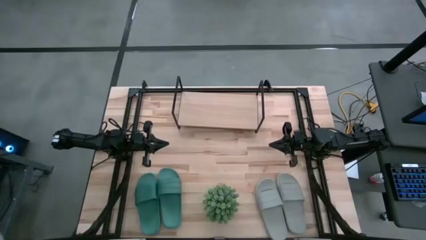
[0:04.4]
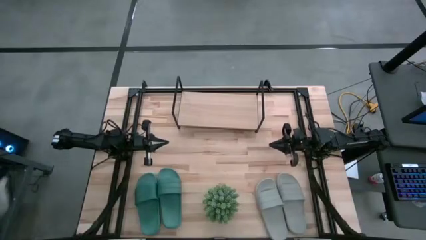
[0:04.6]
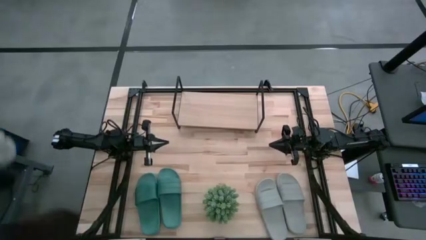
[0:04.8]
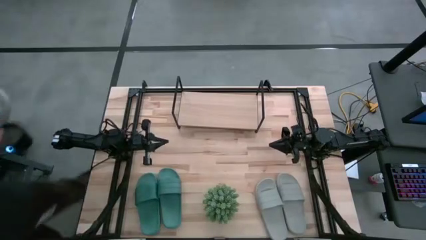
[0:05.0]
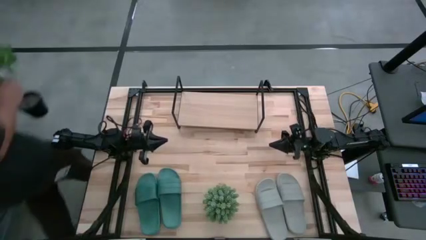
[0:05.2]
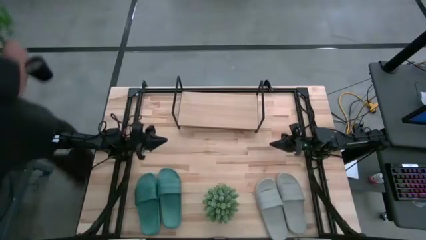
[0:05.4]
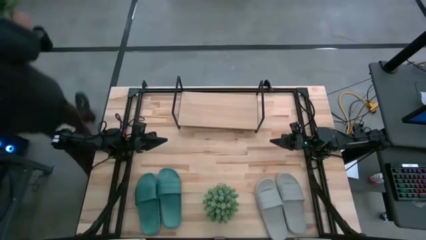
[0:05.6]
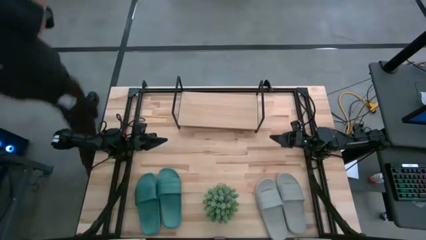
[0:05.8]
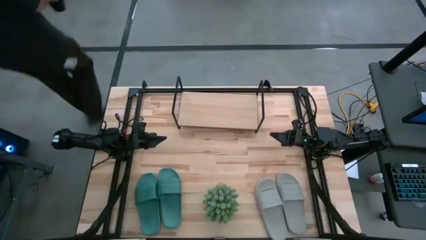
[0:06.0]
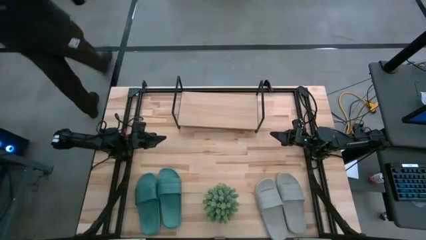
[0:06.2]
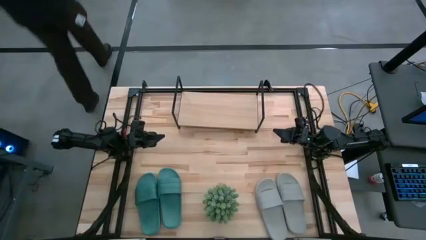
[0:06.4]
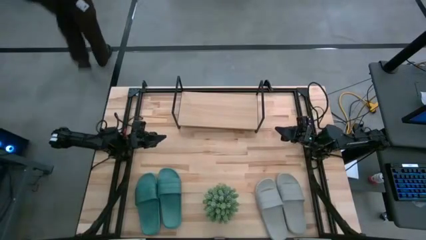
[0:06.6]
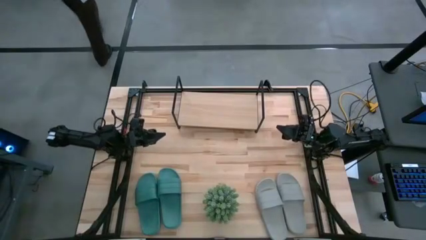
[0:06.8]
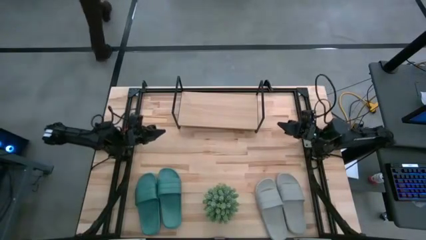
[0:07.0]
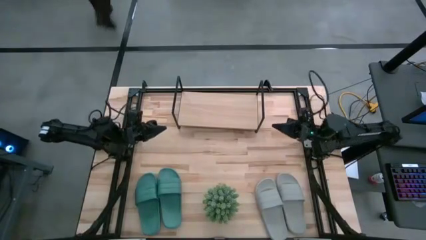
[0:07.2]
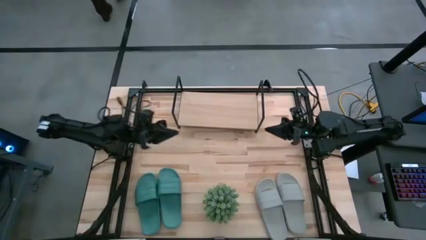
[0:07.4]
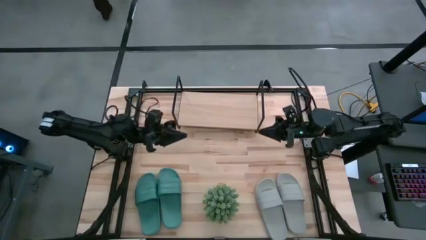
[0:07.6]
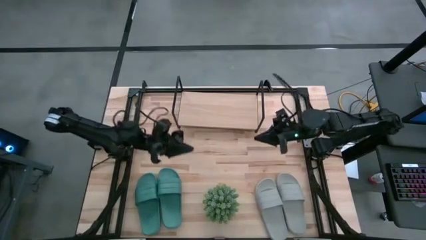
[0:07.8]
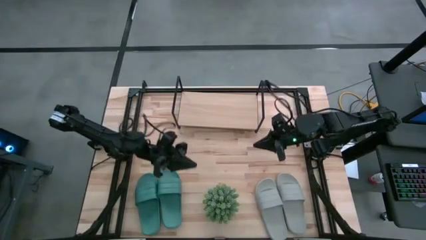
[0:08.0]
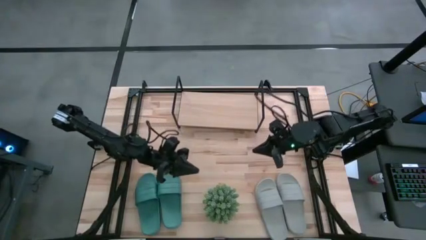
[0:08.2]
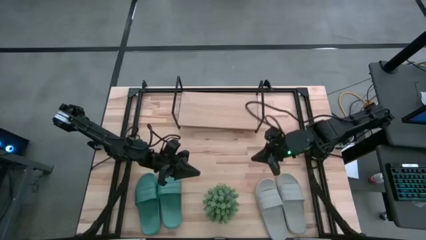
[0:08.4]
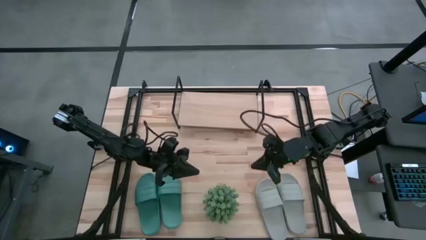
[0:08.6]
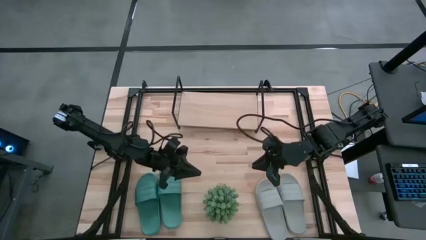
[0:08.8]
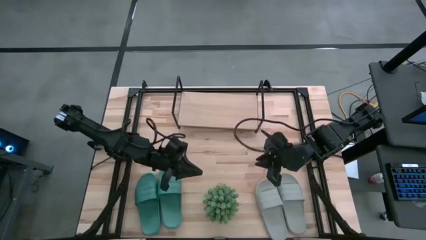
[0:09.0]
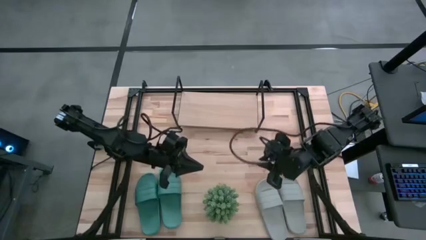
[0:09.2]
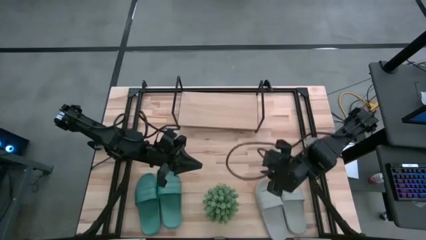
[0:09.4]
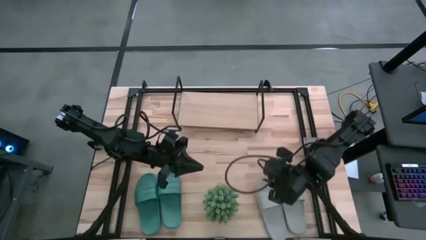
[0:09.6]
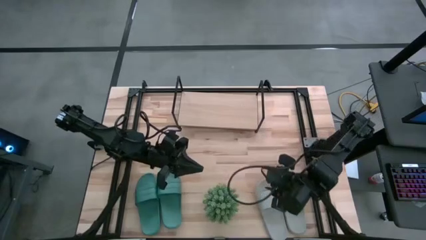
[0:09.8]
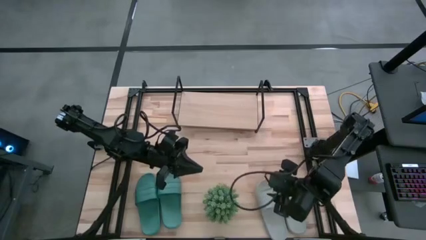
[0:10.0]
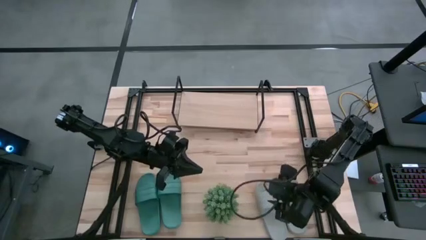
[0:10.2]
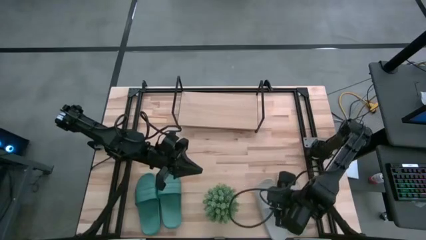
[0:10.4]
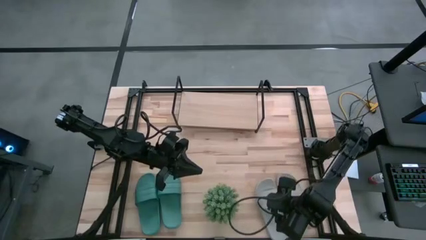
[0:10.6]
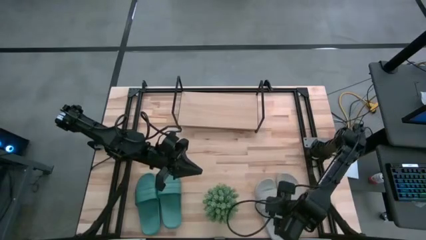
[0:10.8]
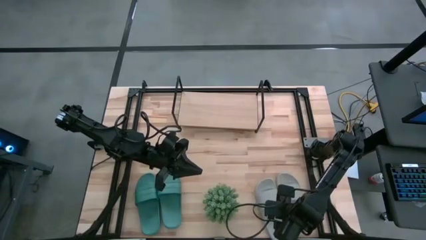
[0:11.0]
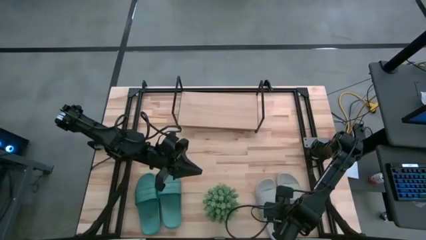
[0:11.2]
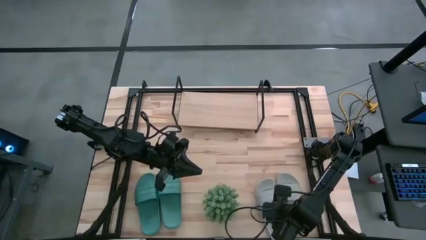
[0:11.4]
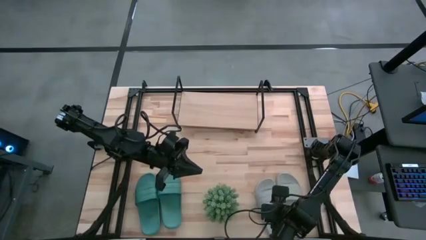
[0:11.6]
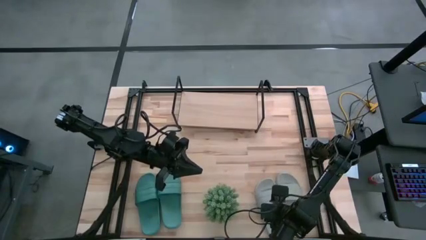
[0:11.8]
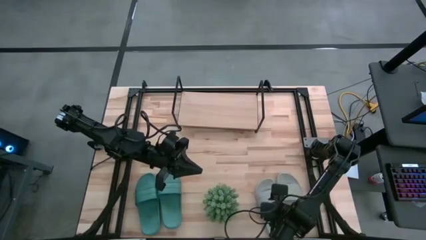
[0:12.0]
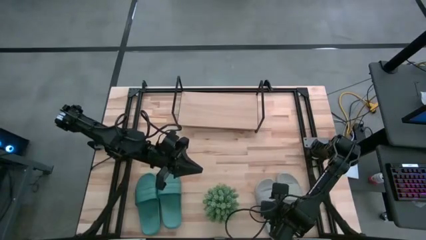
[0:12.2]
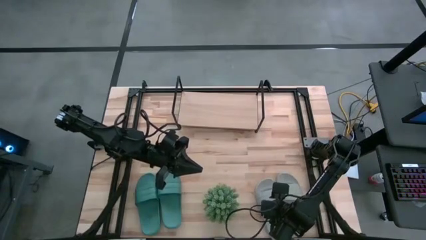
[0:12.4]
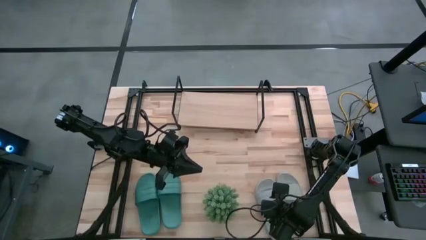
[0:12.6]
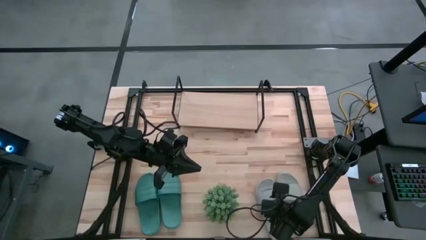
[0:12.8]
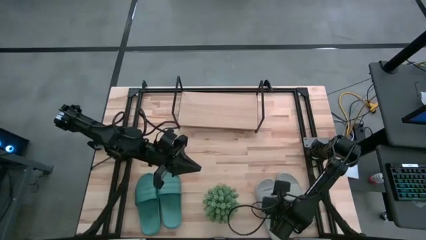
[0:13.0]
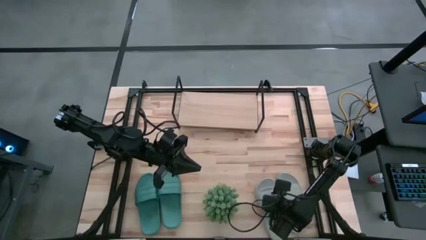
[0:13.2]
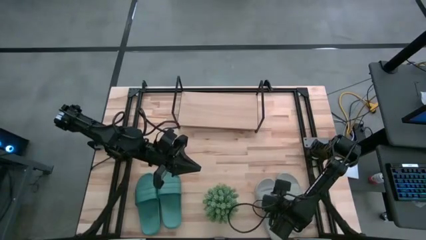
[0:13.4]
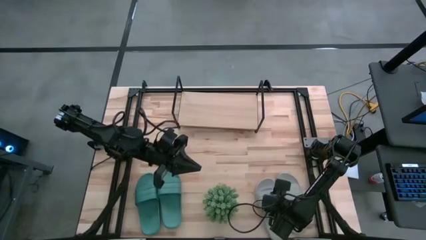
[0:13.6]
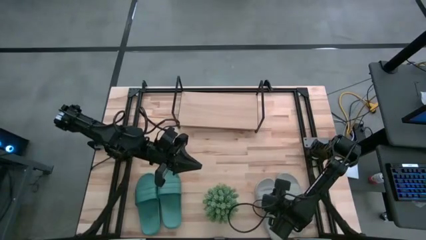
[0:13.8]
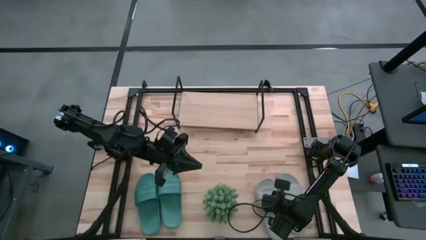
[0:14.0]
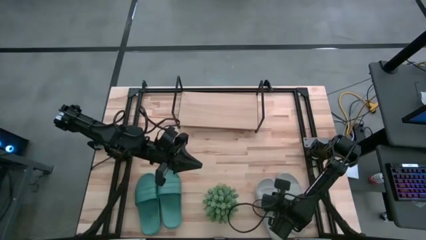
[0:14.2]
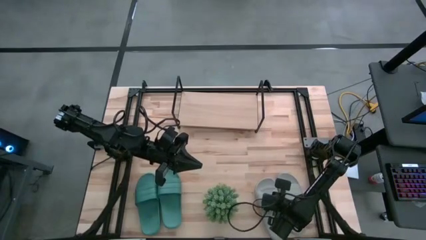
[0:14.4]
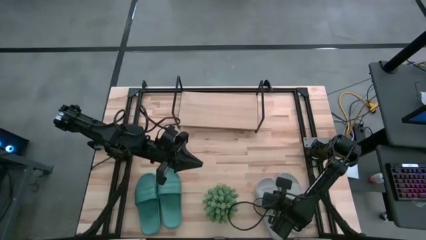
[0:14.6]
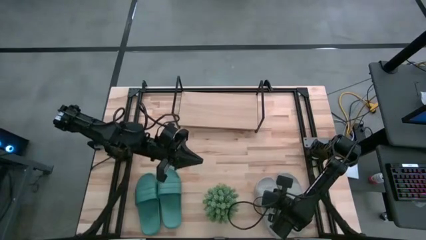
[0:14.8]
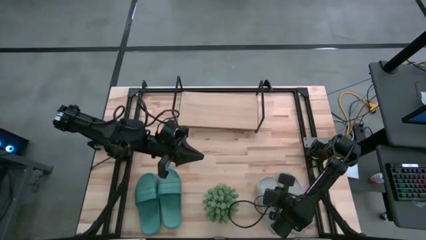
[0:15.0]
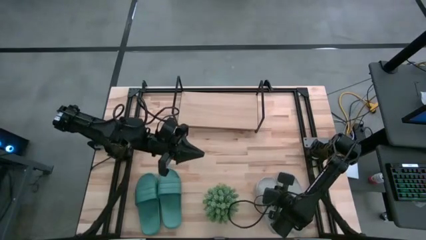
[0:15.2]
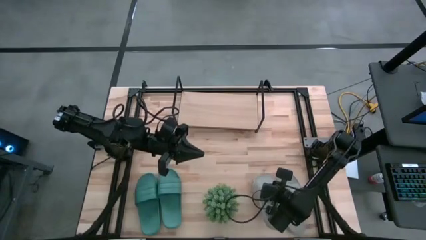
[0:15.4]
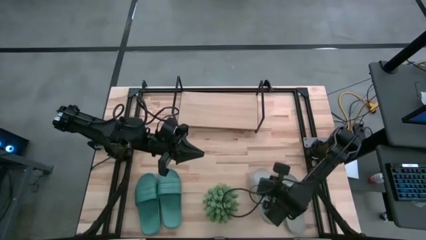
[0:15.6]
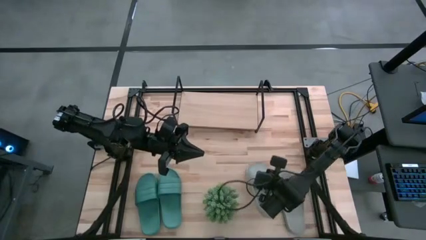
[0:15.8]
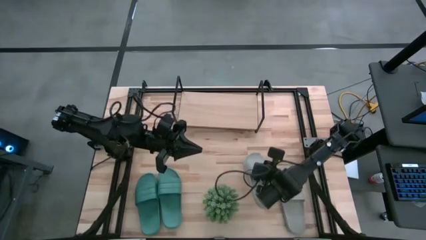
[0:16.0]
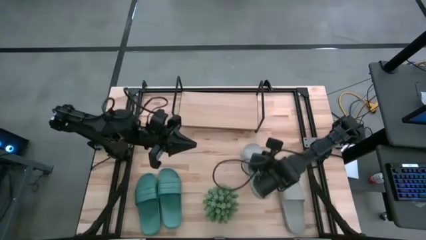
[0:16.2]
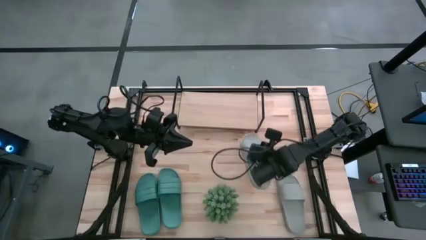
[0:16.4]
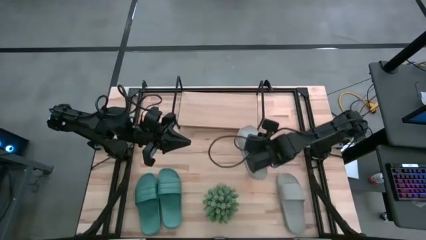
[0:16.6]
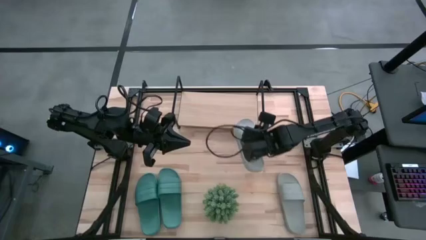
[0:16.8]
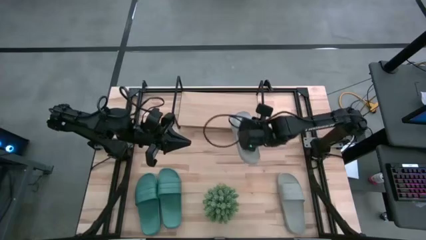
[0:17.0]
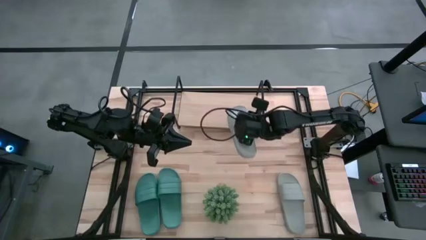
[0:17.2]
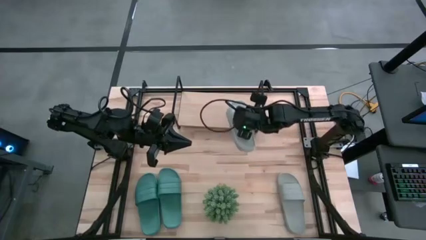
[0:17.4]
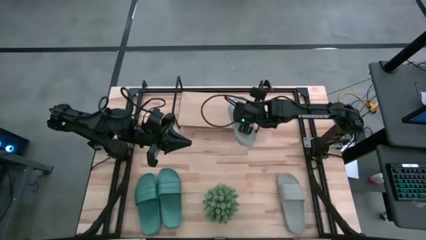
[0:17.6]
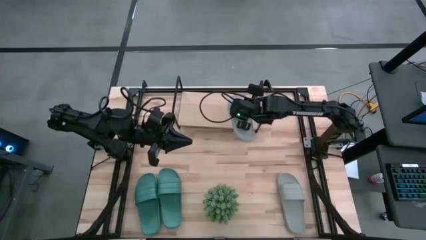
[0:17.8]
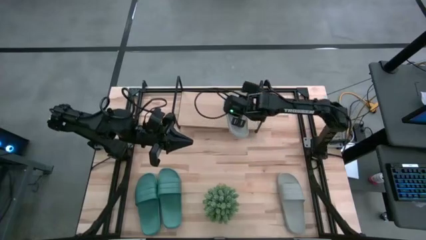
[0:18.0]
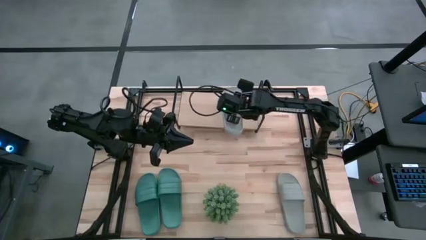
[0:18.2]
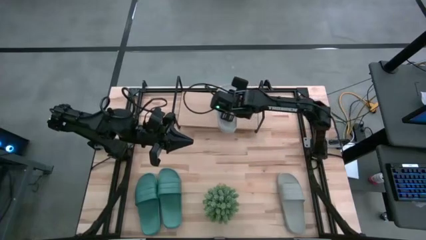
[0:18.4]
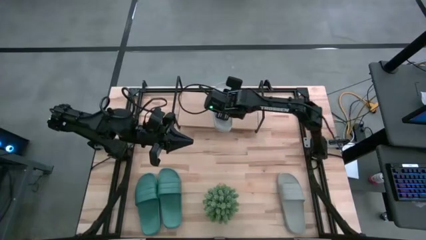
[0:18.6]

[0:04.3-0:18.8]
Task: Pick and place slides into the shelf
Put the left gray slipper on the shelf
